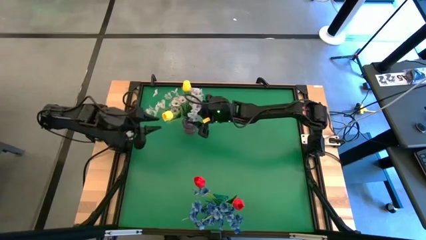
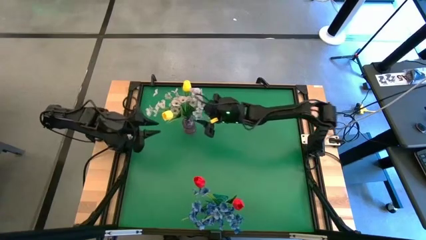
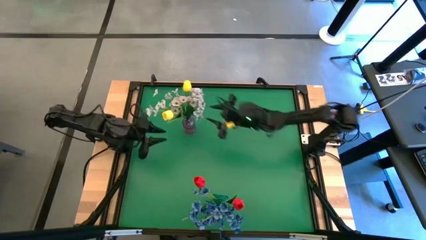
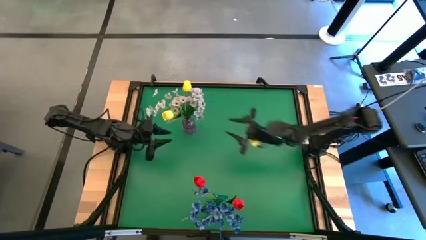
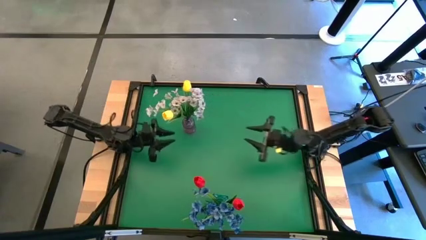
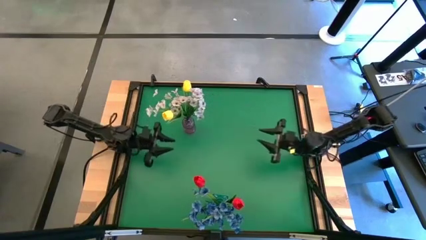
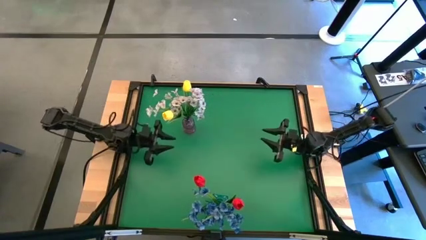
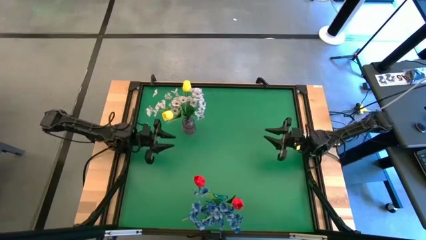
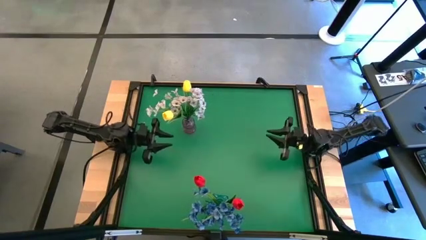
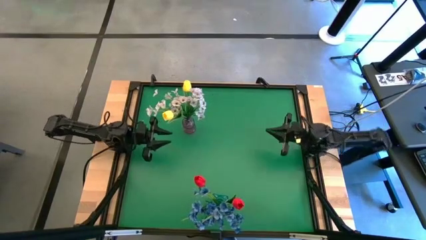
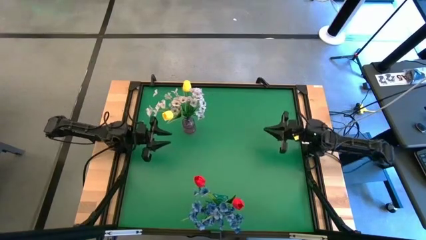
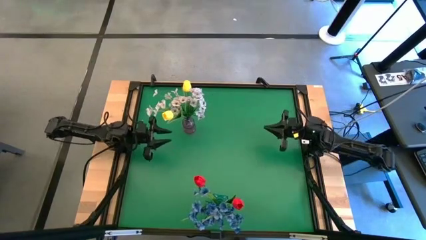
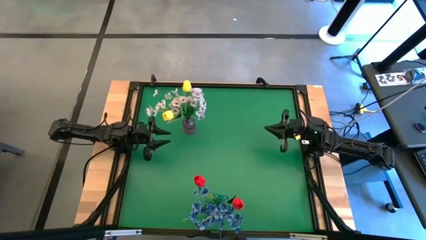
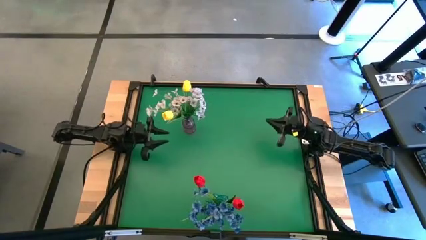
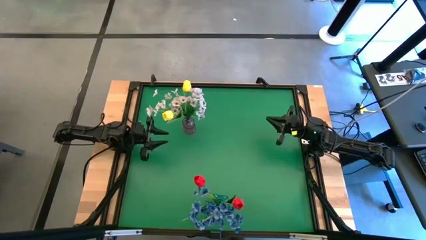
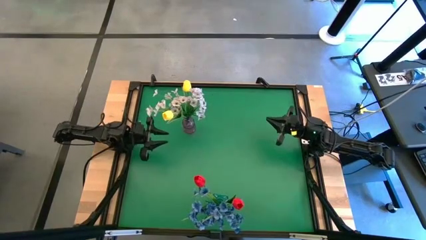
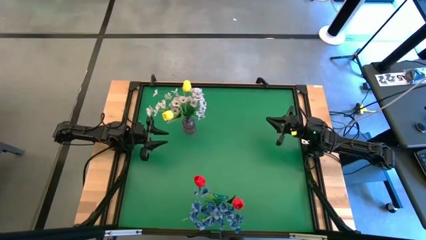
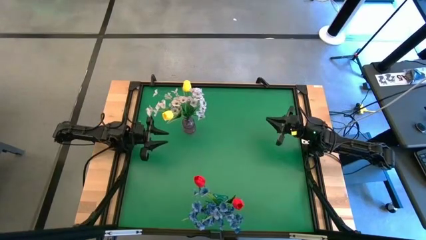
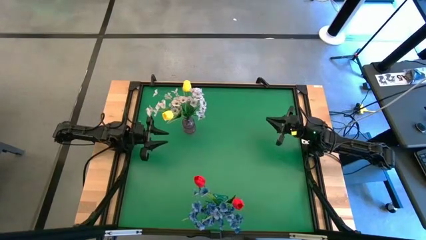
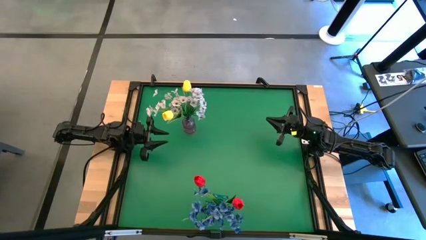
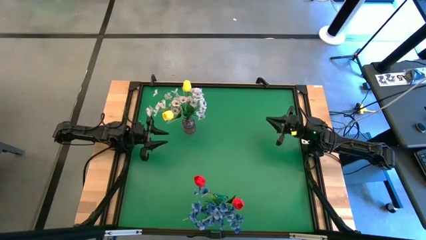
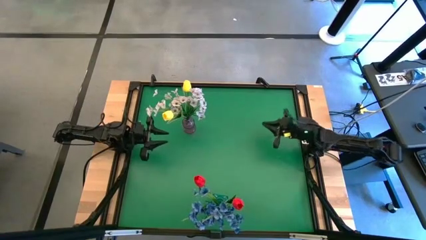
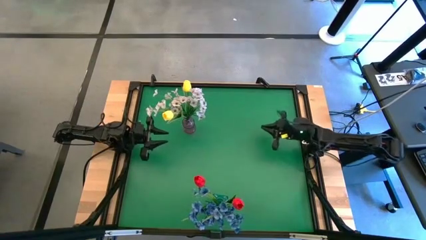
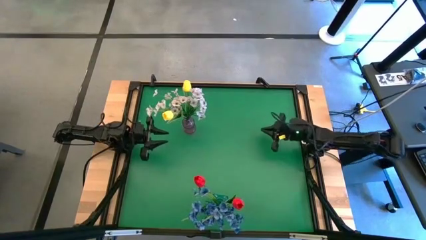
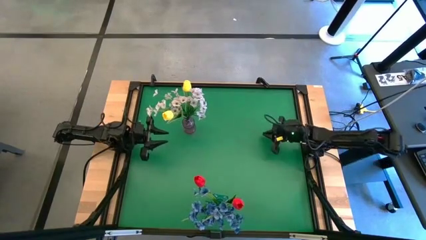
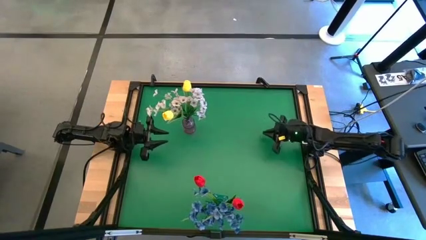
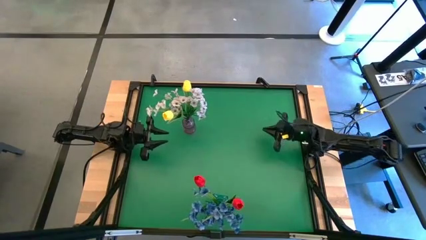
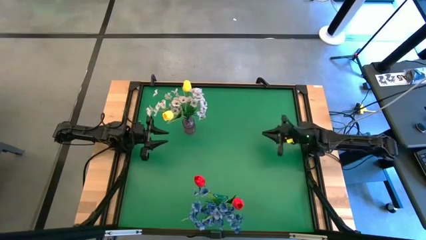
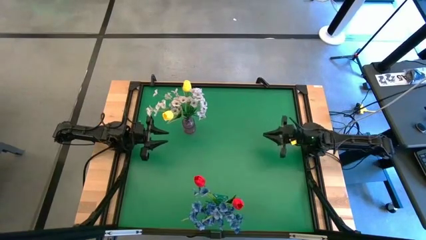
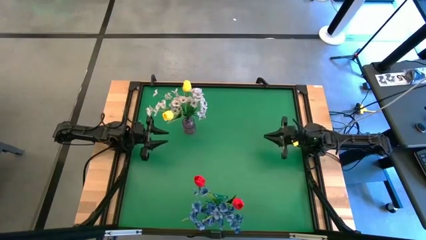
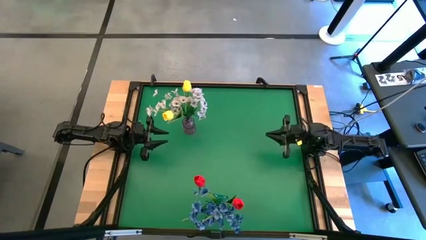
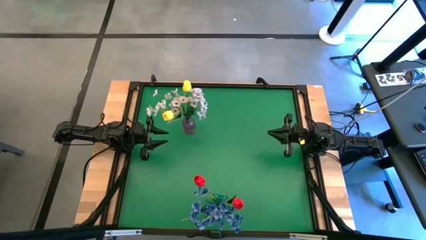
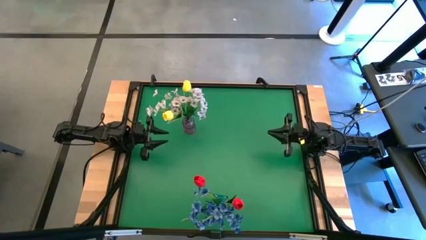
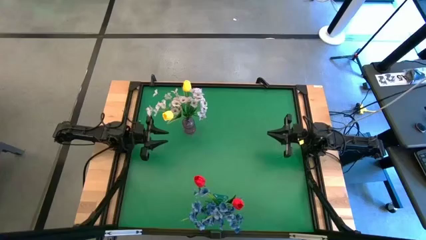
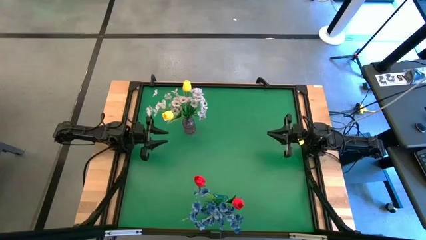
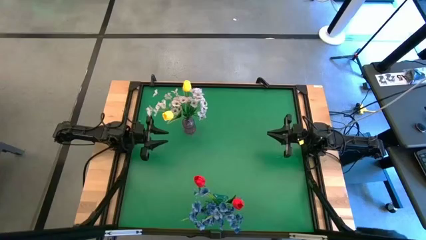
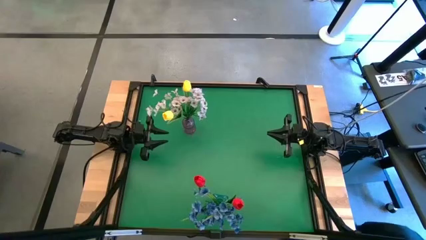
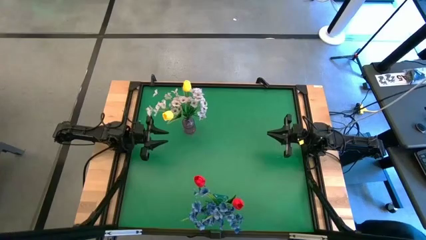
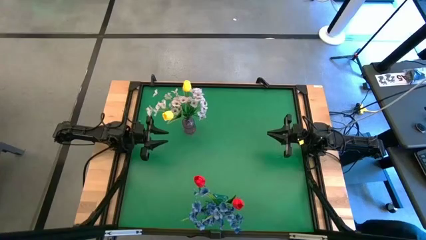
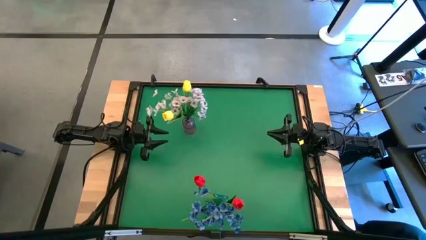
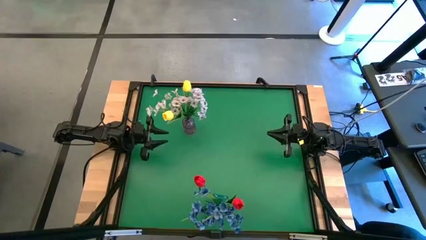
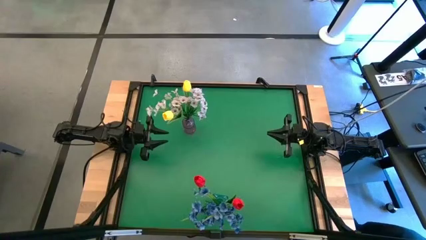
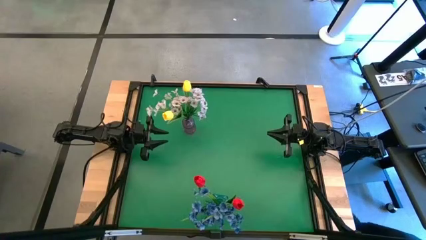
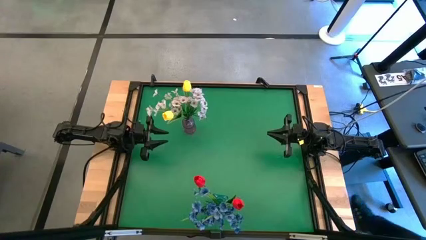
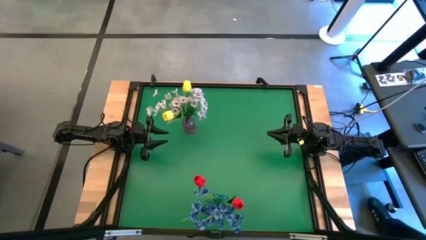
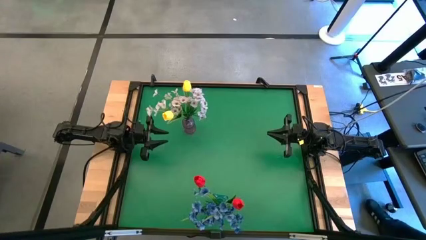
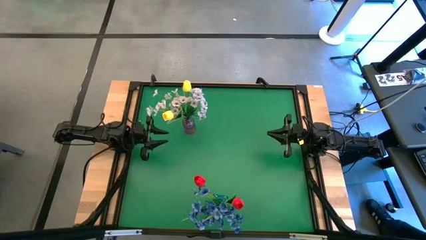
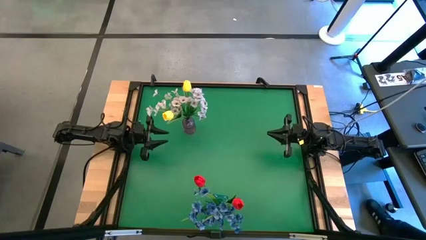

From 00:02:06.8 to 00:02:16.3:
Task: Sort flowers into vase by color
Return to Home Position

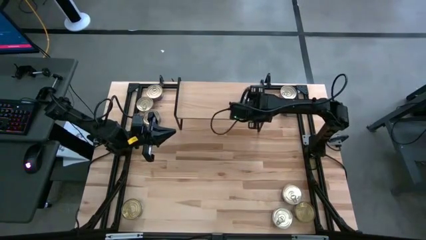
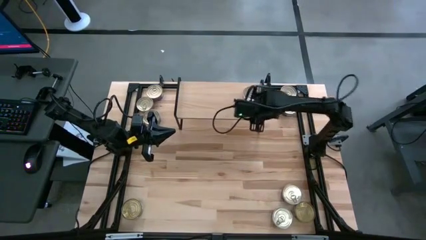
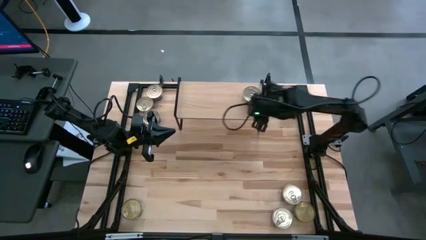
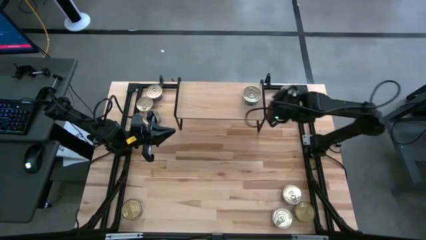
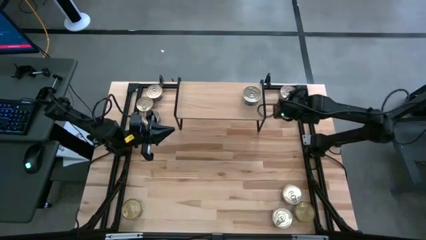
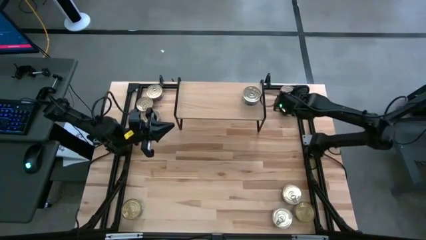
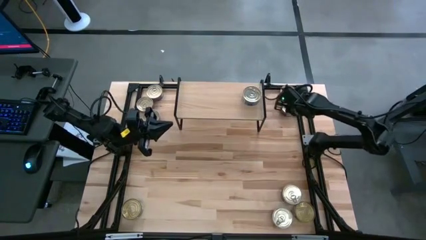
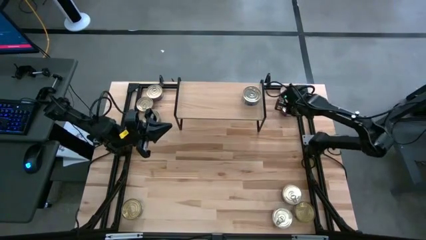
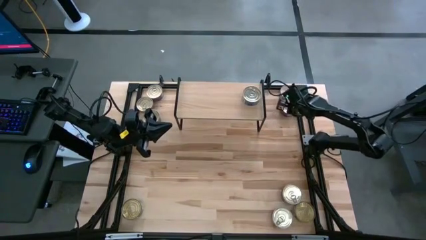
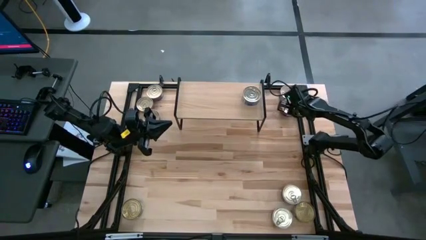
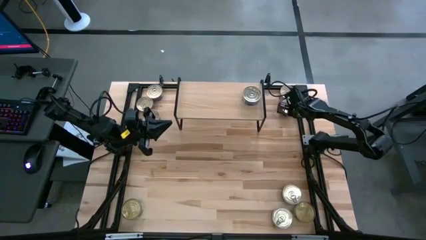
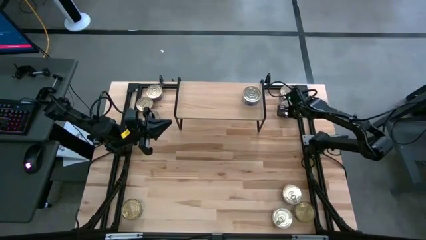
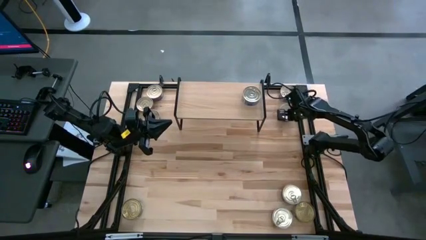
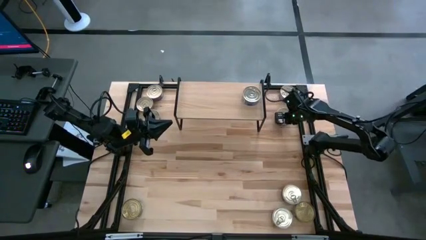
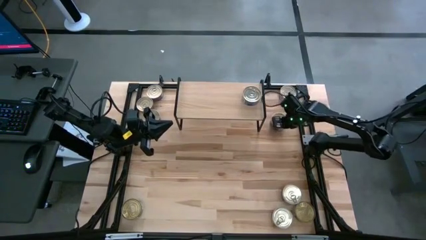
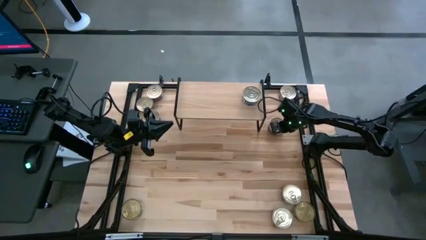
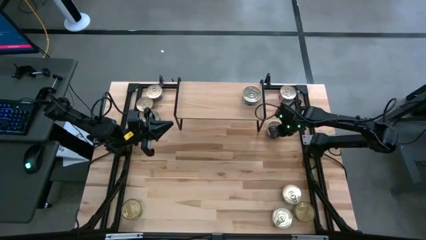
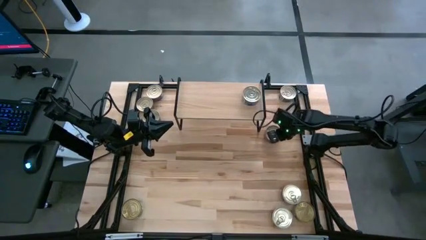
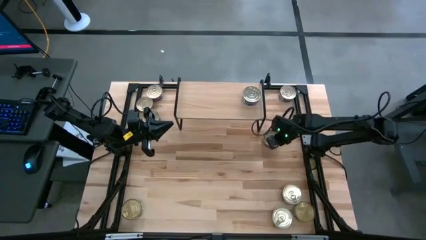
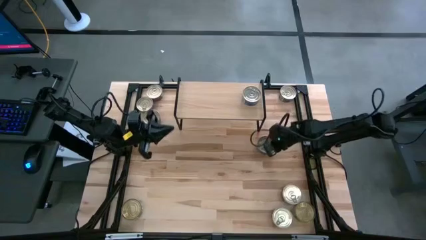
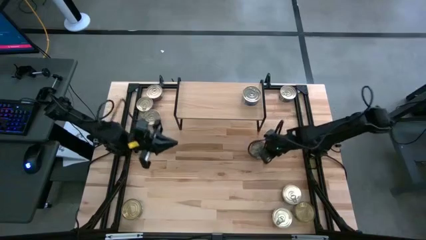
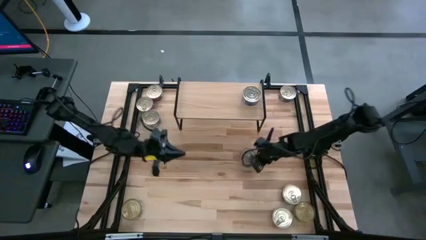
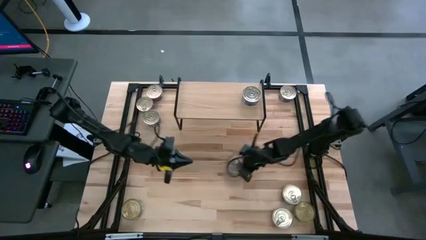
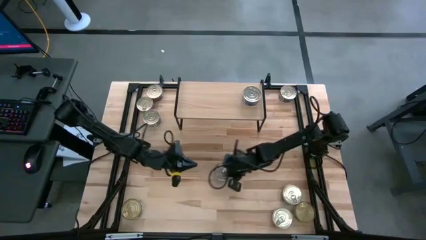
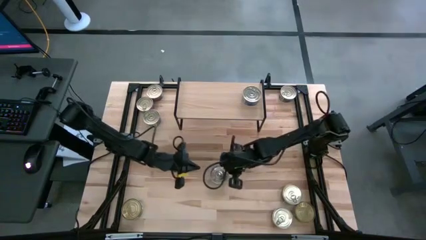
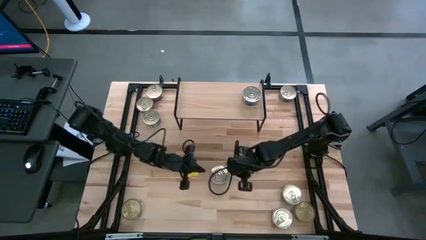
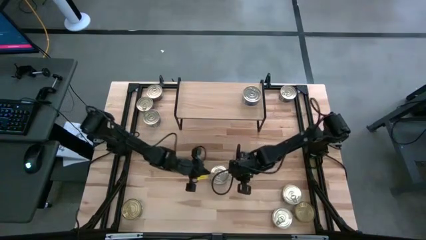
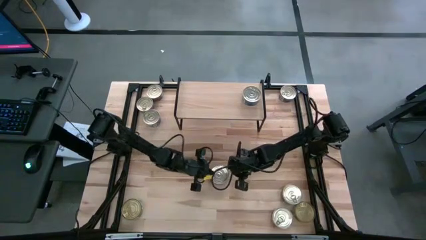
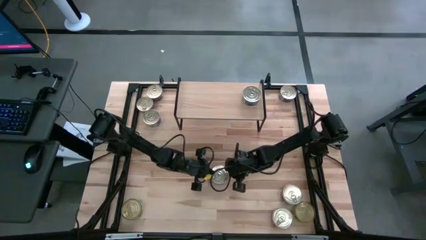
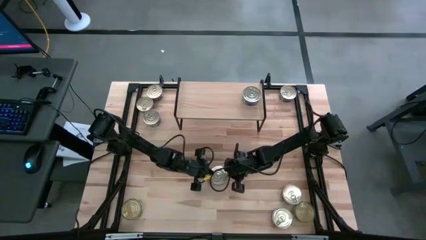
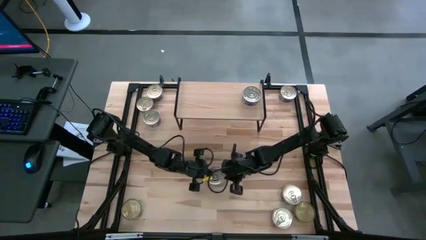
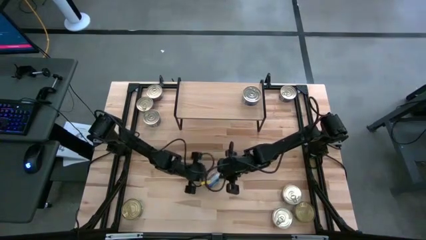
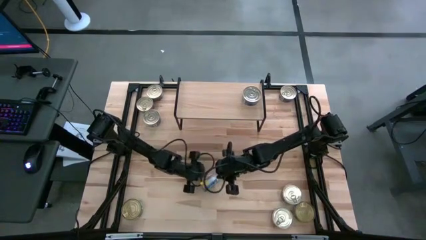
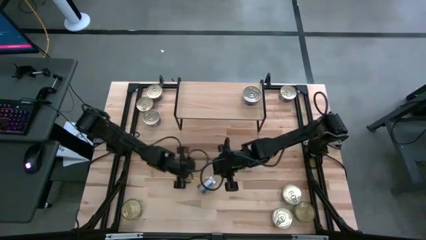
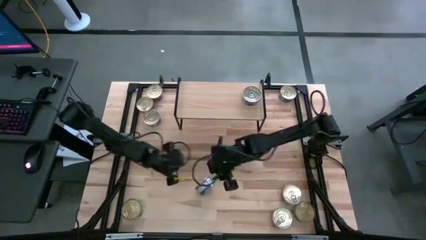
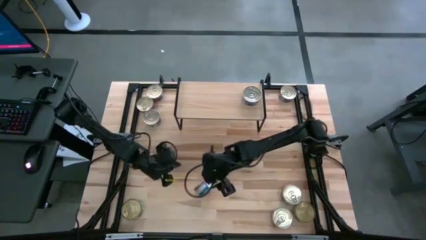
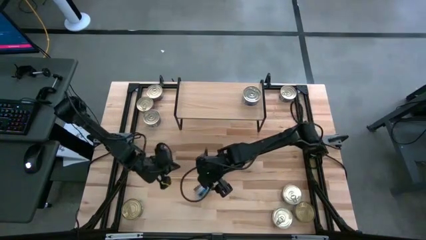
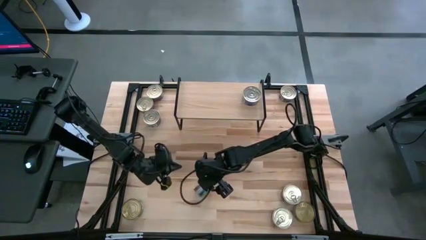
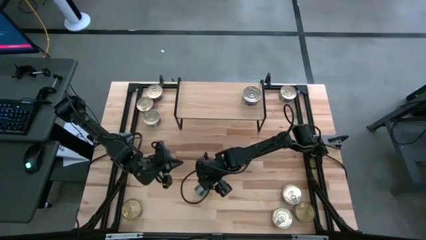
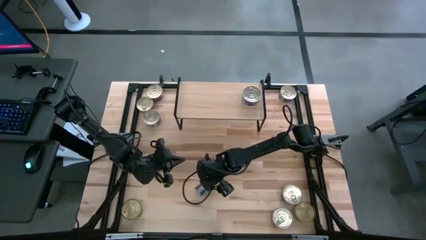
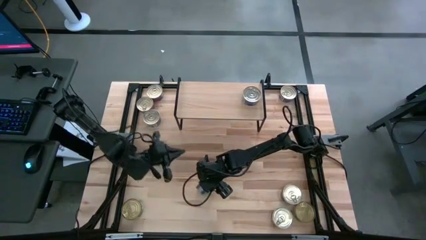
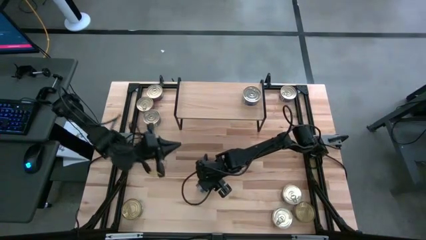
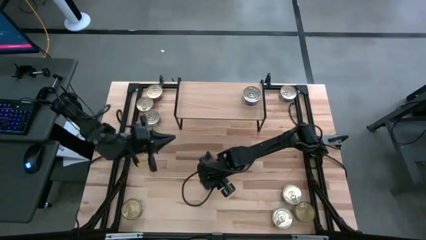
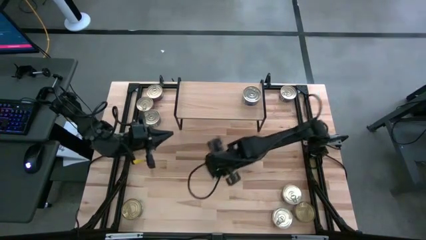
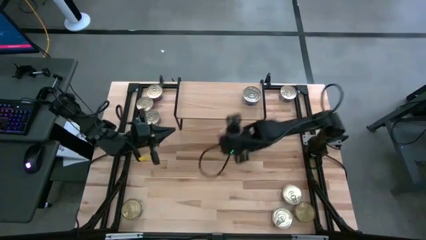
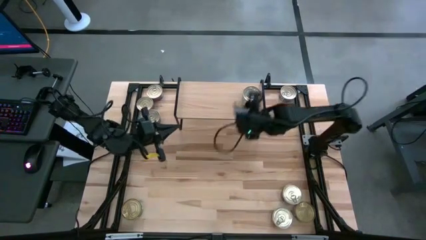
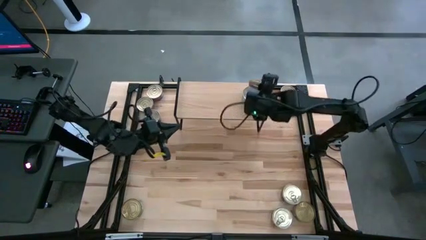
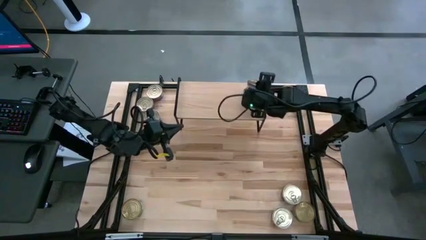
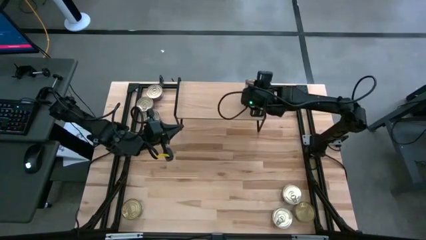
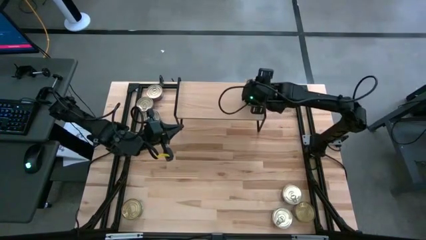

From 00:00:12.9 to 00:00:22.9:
Task: Stack canned seafood by type on shelf
Stack the blue tuna can on top of the blue tuna can on the shelf
